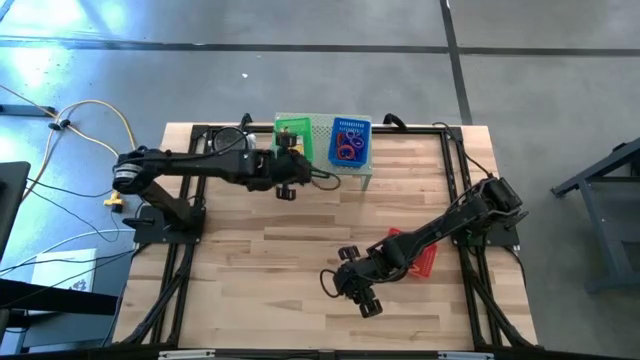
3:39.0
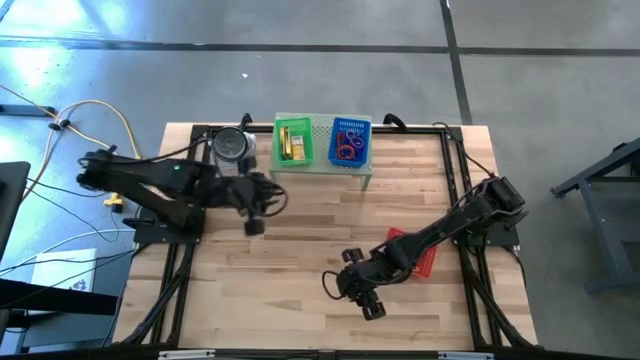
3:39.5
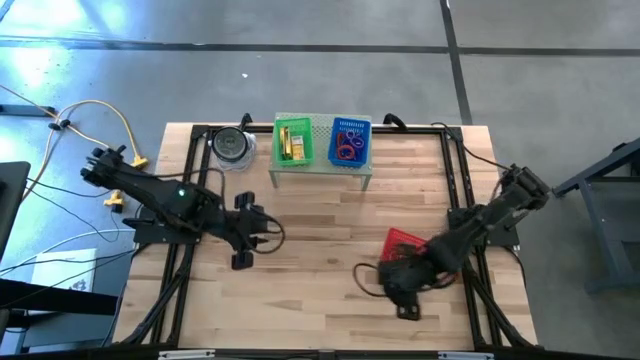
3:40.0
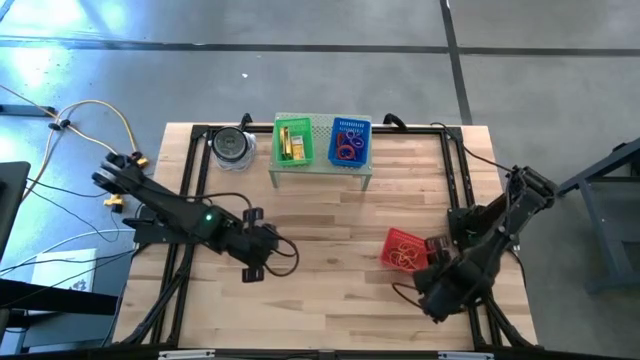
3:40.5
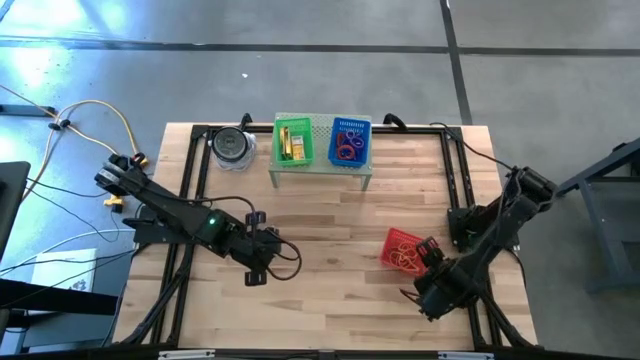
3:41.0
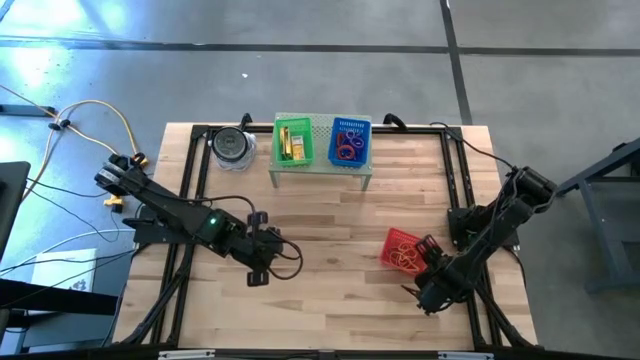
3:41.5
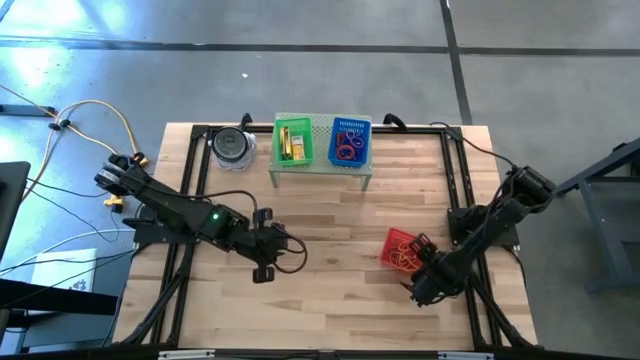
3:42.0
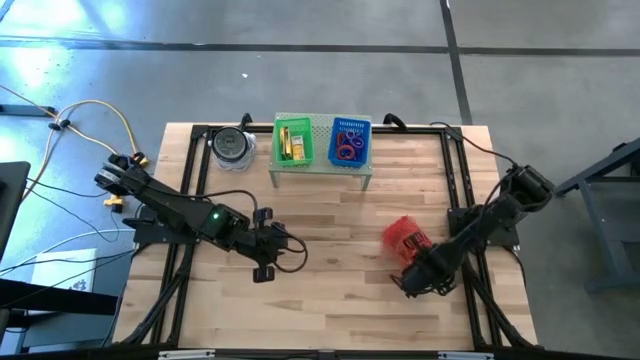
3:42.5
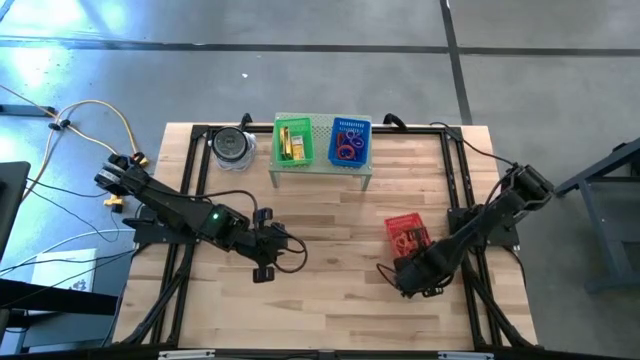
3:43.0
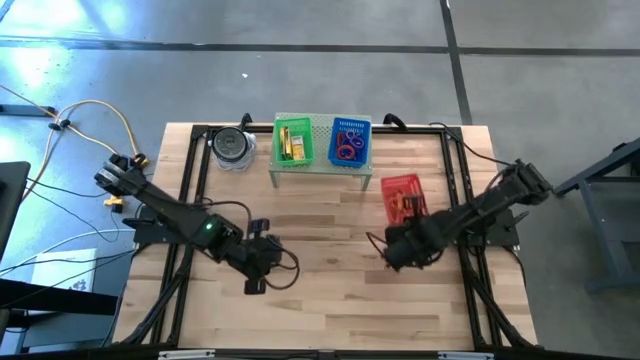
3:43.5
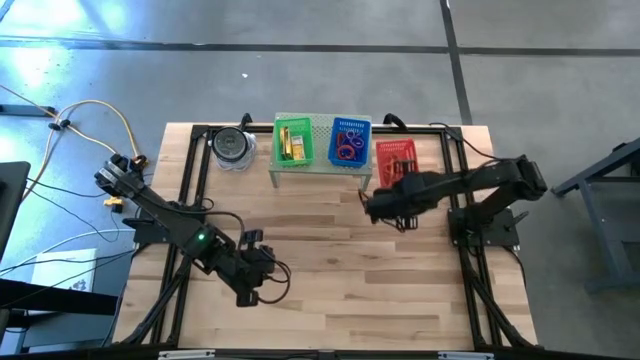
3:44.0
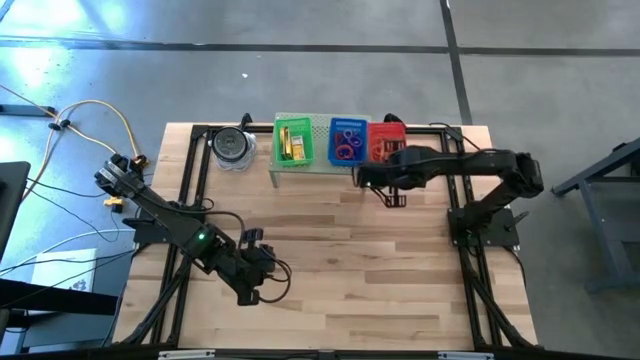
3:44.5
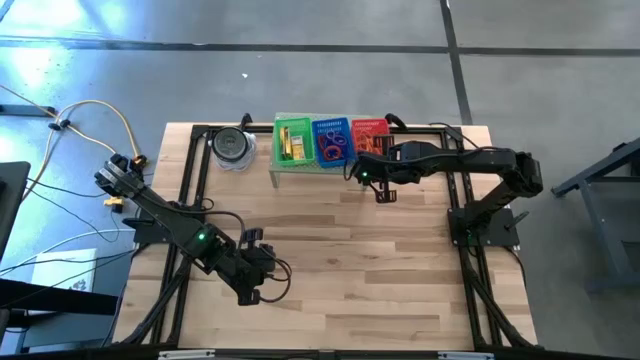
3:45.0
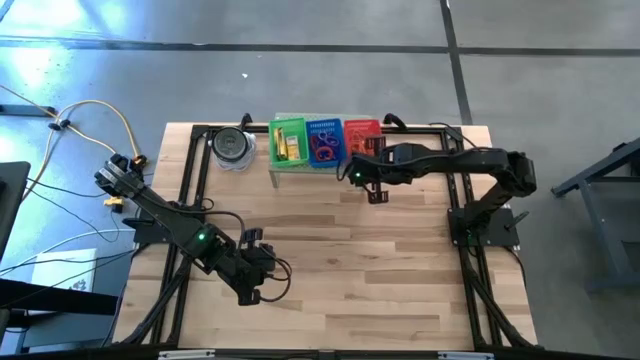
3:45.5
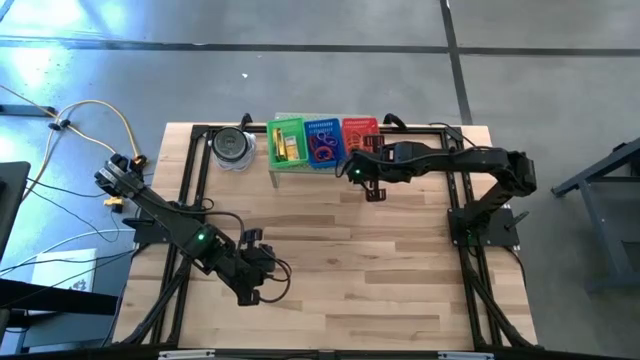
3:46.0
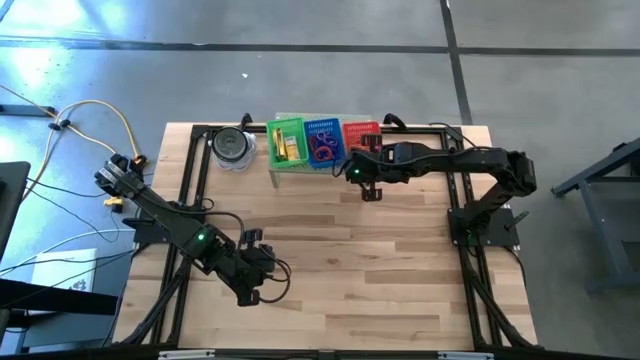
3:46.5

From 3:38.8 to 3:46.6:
Task: Pick & Place Office Desk Supplies
Put the red basket on the shelf

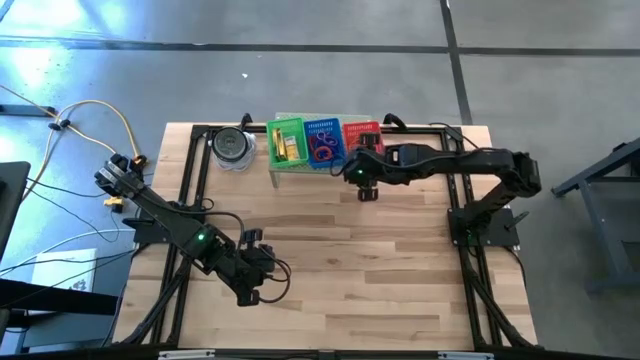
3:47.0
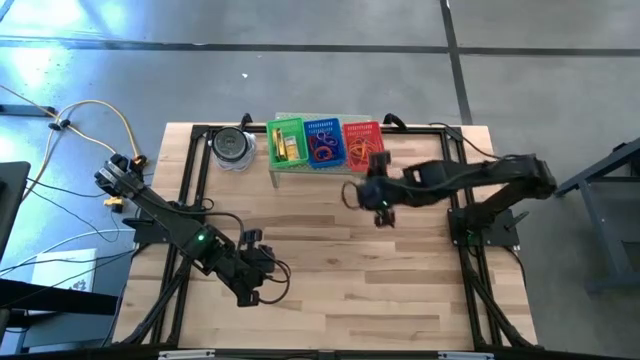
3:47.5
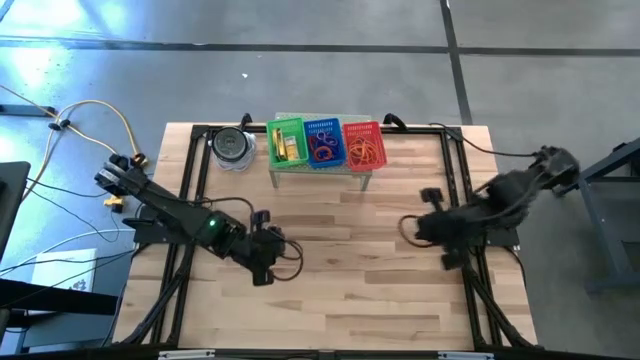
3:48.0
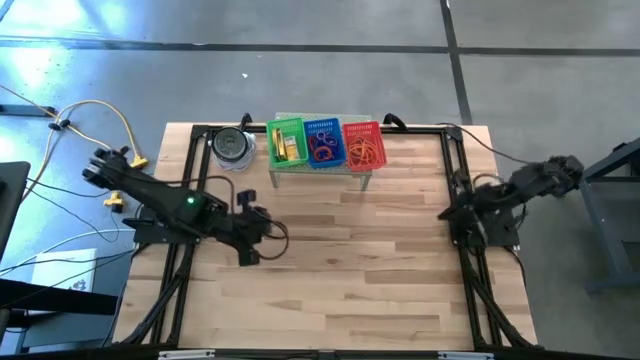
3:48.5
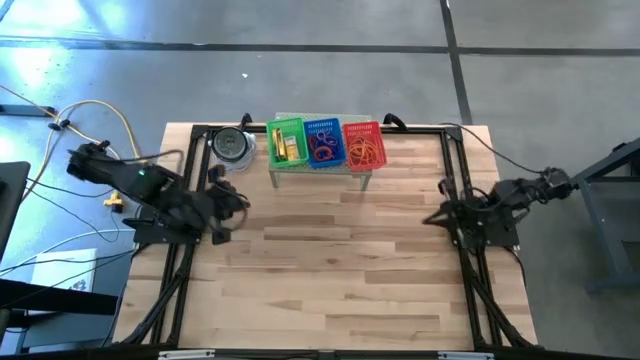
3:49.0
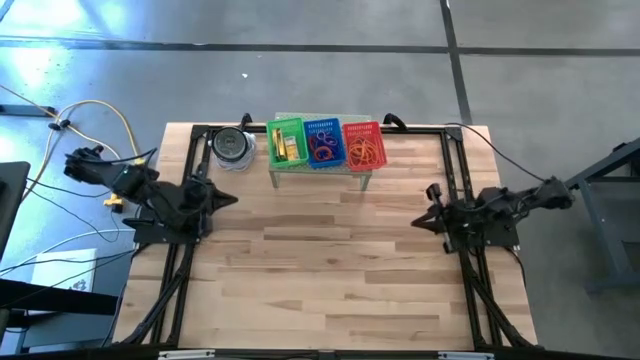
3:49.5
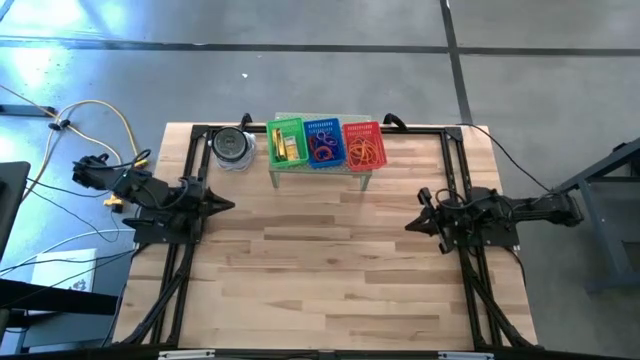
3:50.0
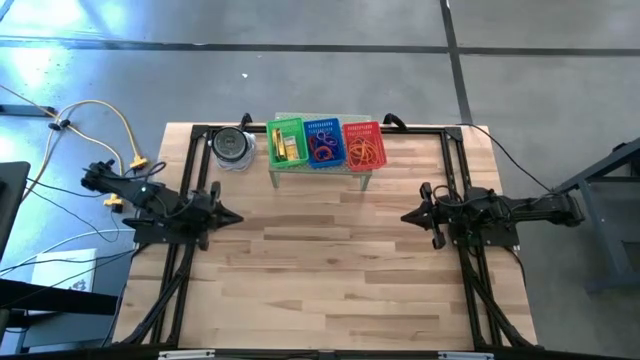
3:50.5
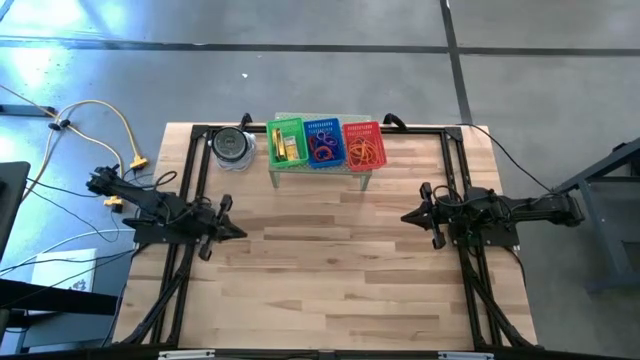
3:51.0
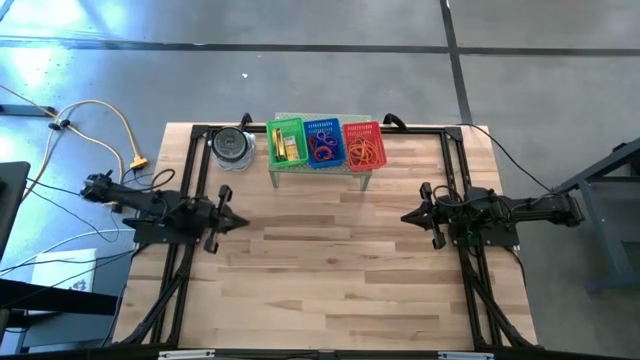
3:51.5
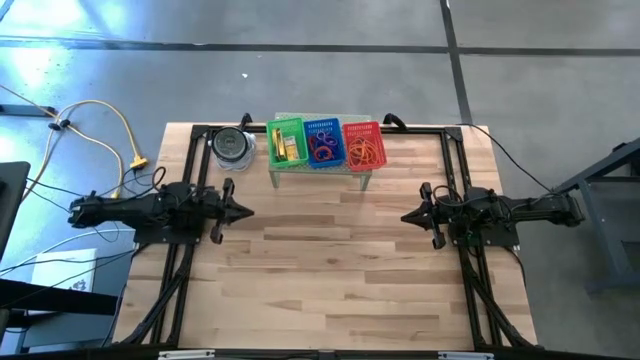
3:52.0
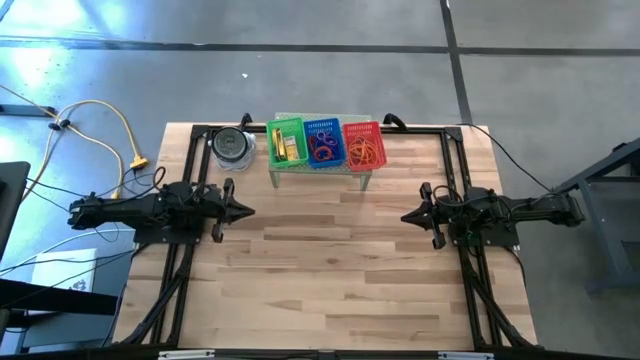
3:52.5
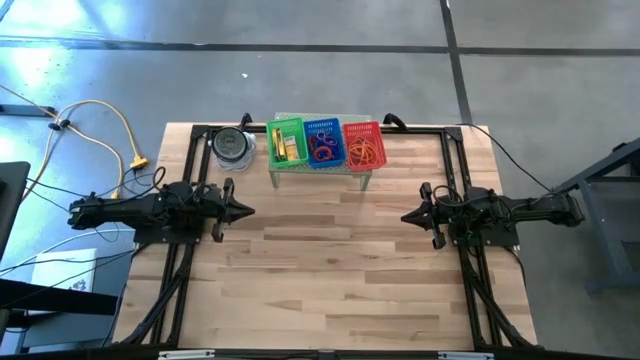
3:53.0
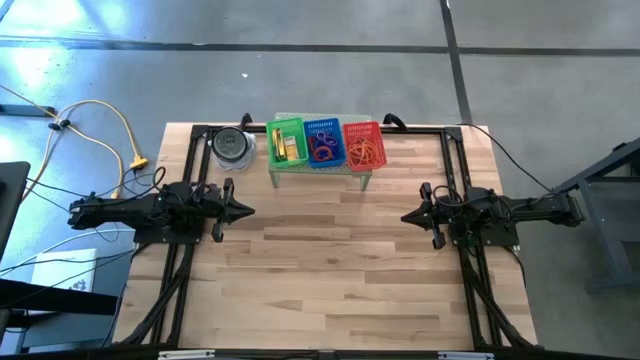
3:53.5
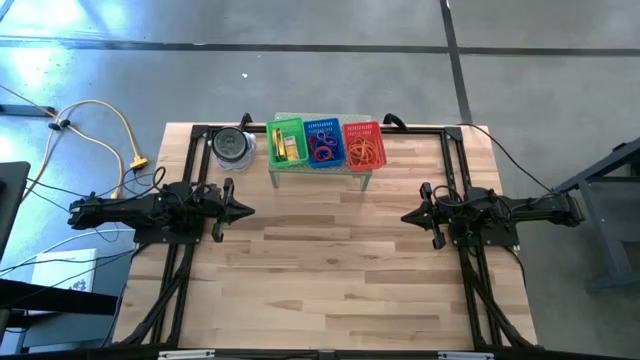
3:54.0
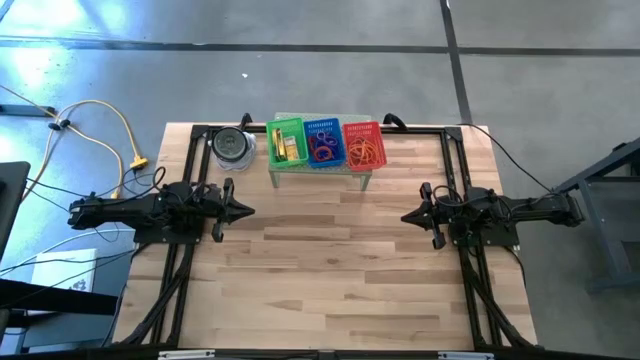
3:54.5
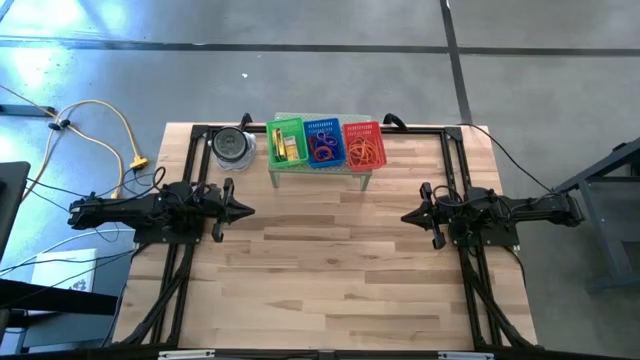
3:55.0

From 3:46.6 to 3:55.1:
Return to Home Position

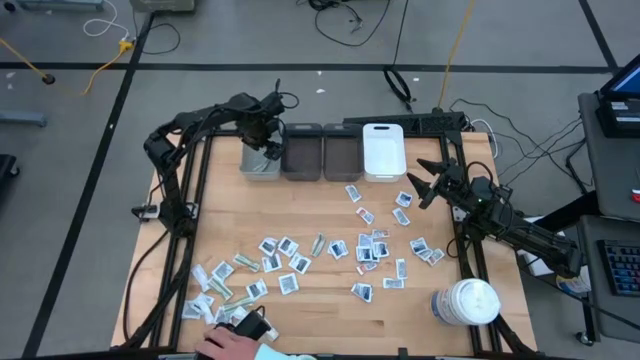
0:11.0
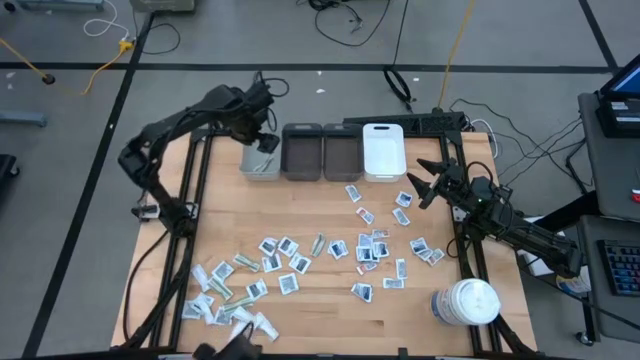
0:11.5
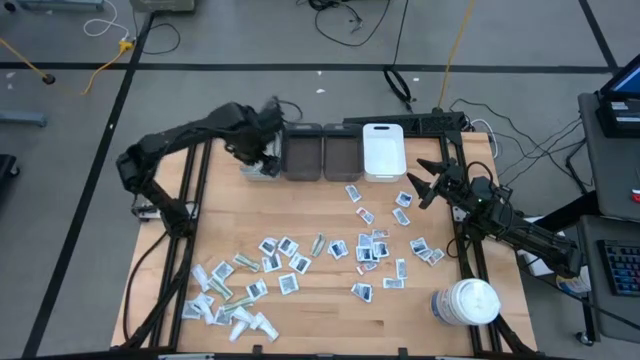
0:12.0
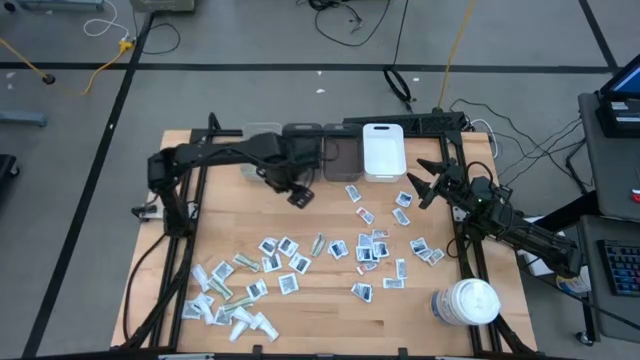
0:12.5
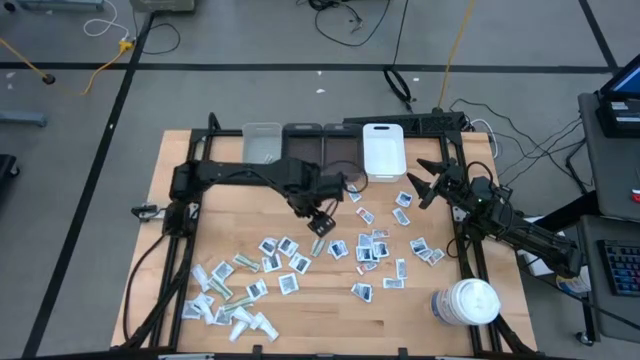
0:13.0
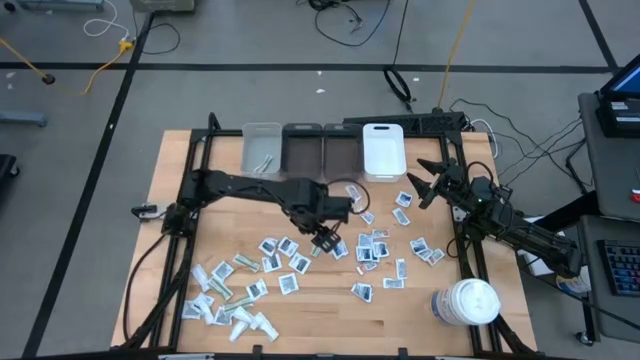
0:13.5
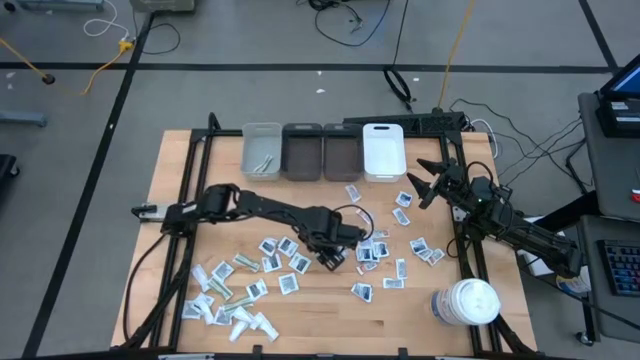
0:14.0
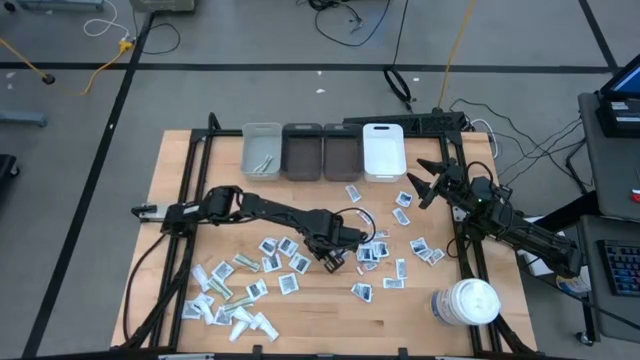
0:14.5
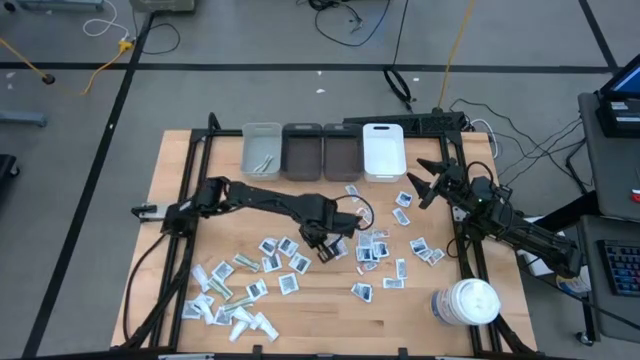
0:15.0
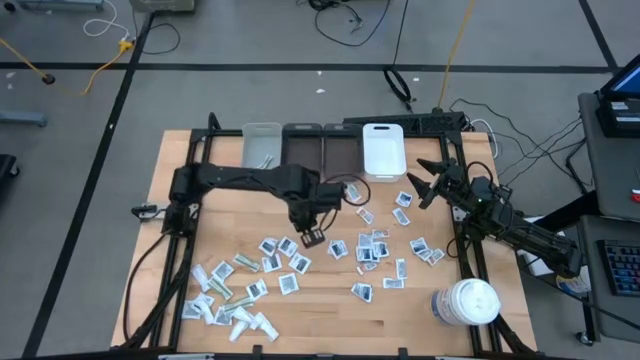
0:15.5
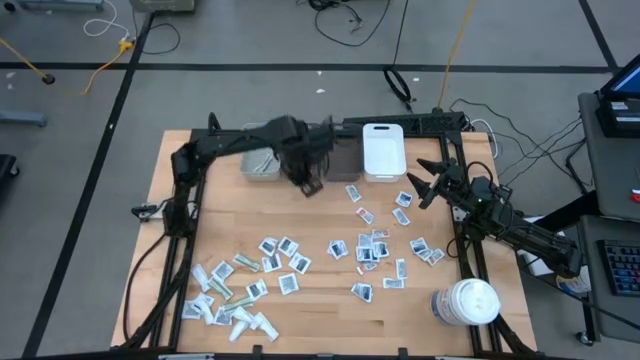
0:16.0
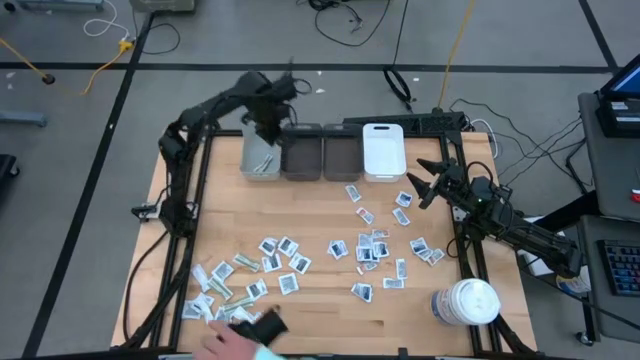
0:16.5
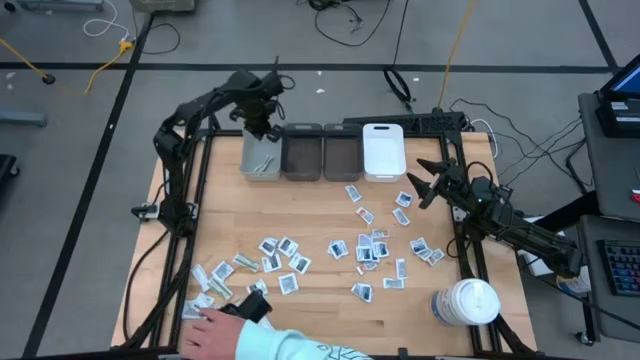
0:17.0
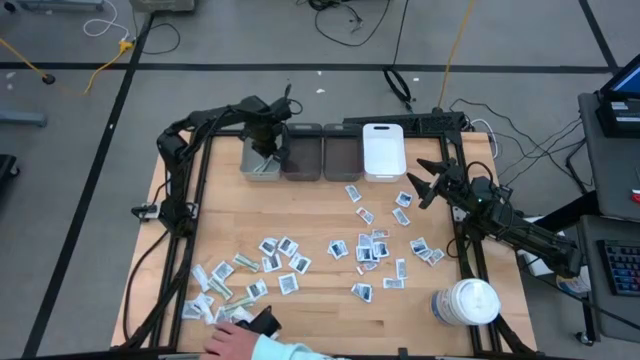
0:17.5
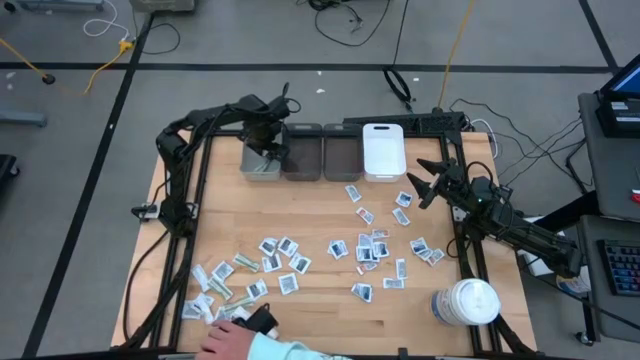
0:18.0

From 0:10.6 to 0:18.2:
Task: Pick & Place First Aid Supplies
Put the bandage into the gray bin
